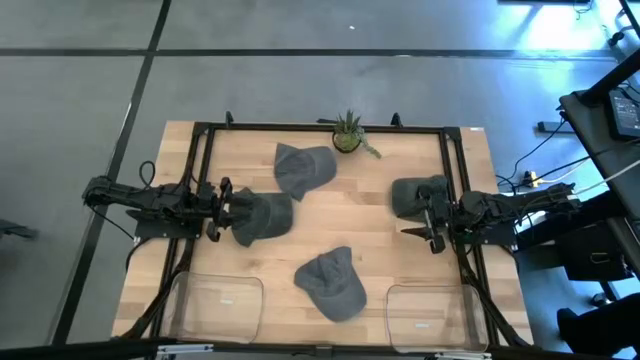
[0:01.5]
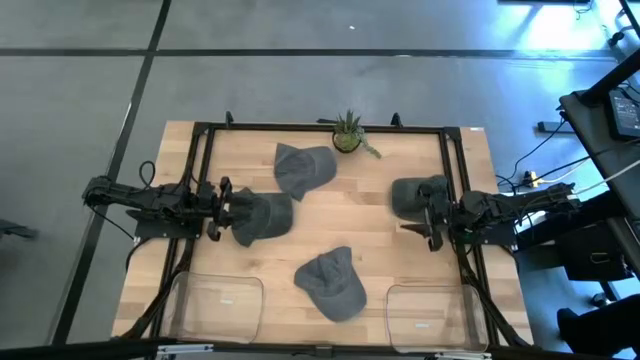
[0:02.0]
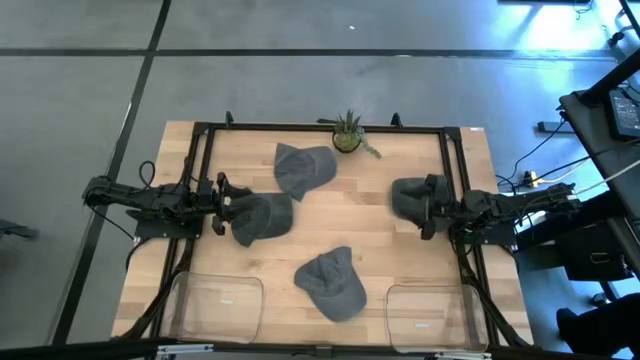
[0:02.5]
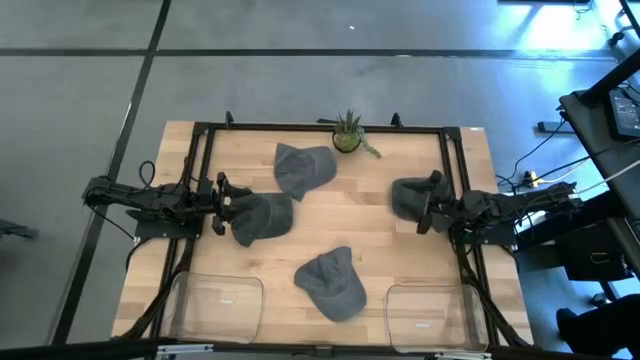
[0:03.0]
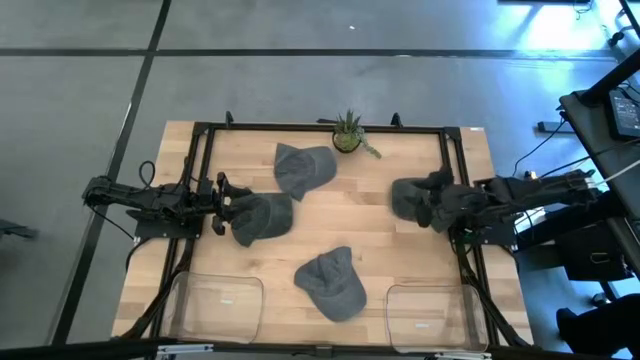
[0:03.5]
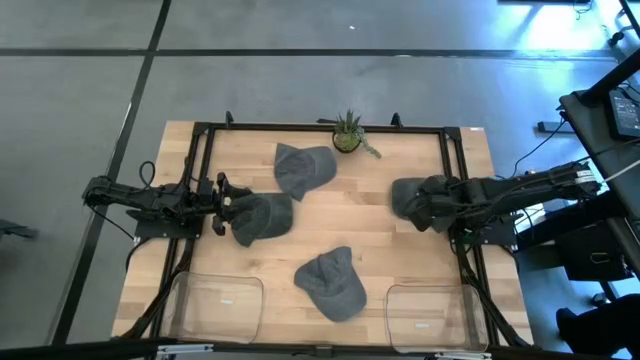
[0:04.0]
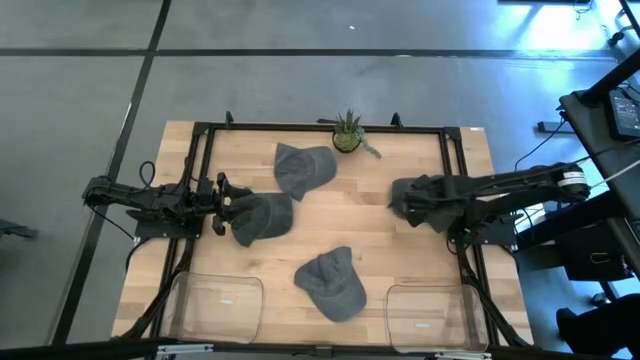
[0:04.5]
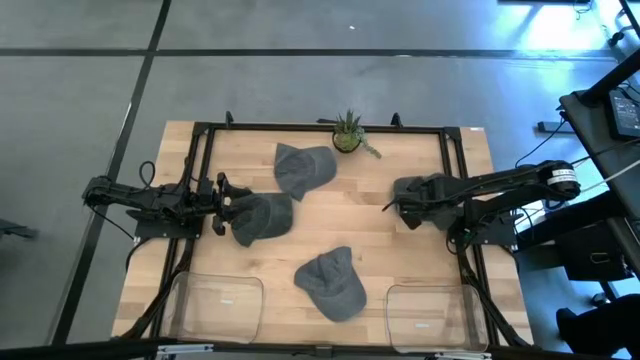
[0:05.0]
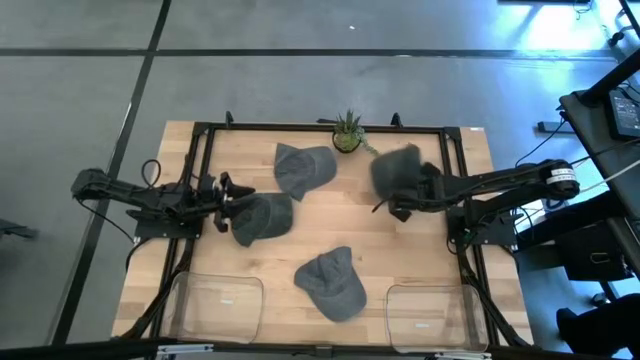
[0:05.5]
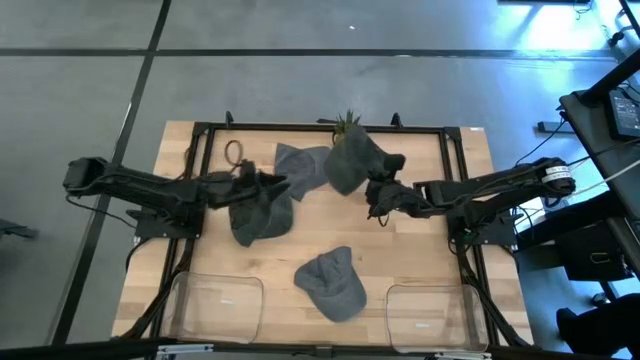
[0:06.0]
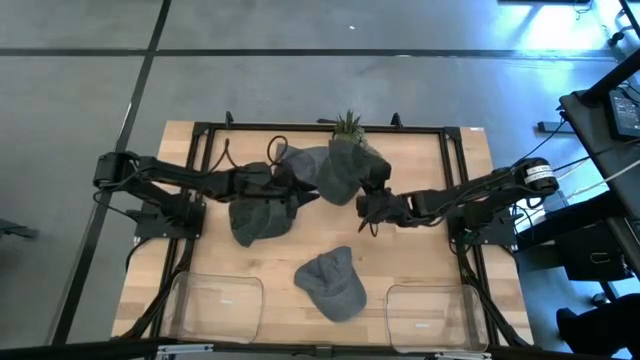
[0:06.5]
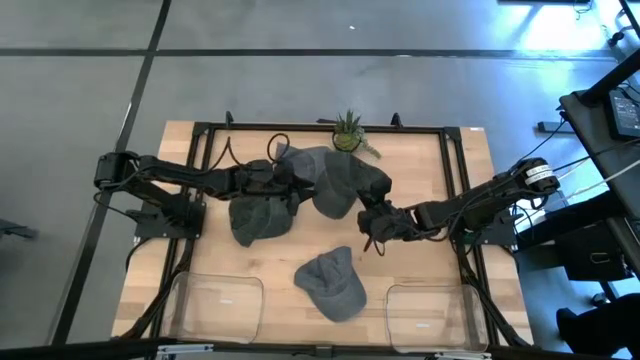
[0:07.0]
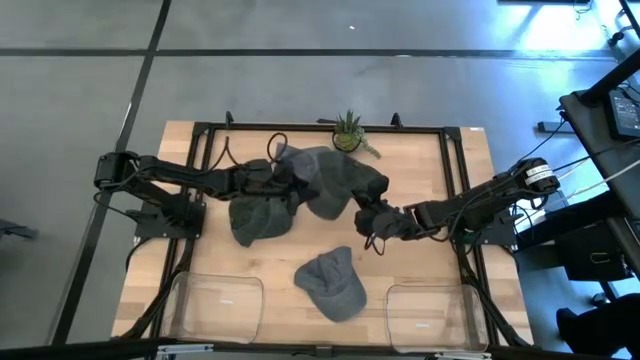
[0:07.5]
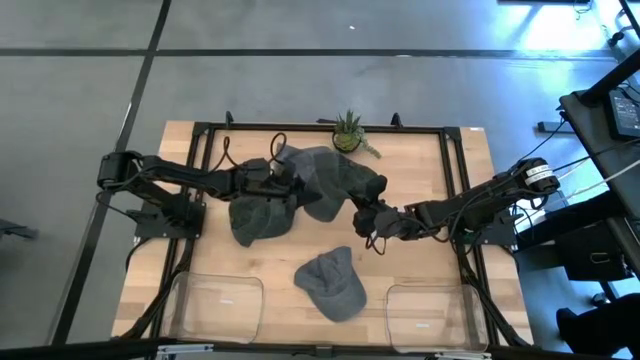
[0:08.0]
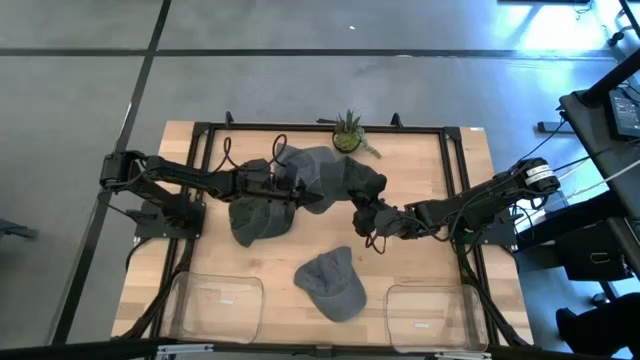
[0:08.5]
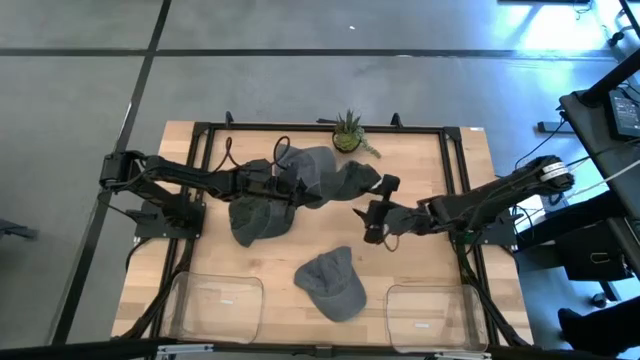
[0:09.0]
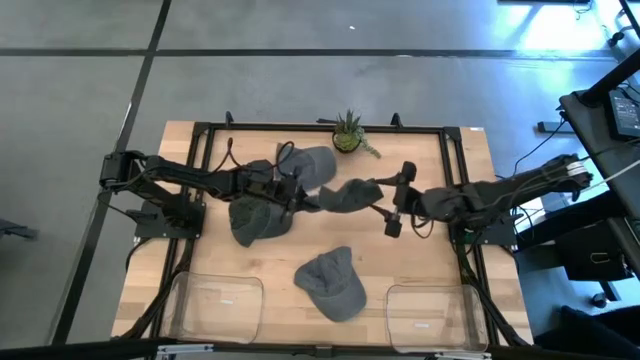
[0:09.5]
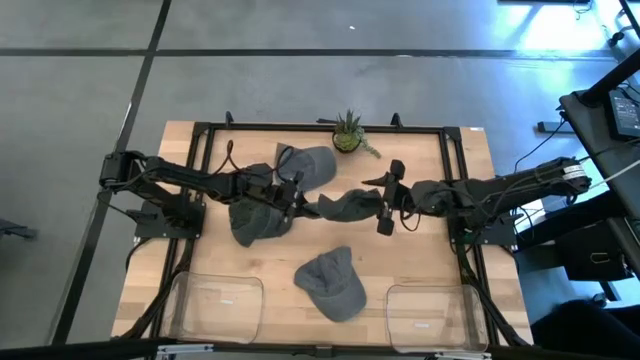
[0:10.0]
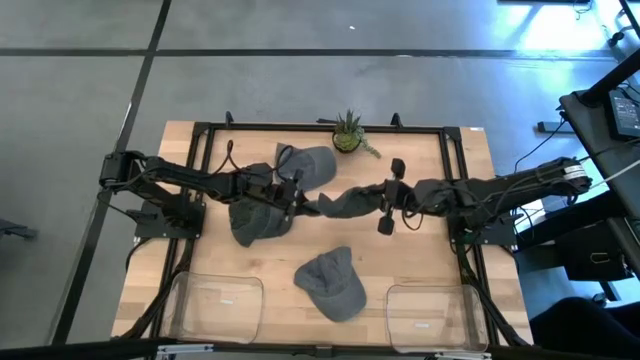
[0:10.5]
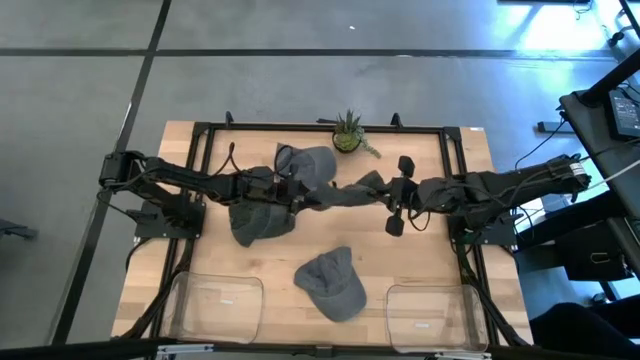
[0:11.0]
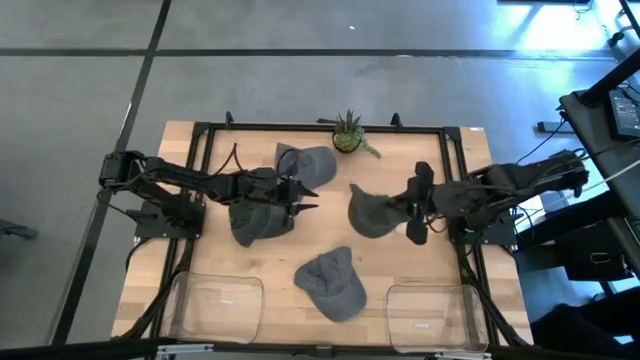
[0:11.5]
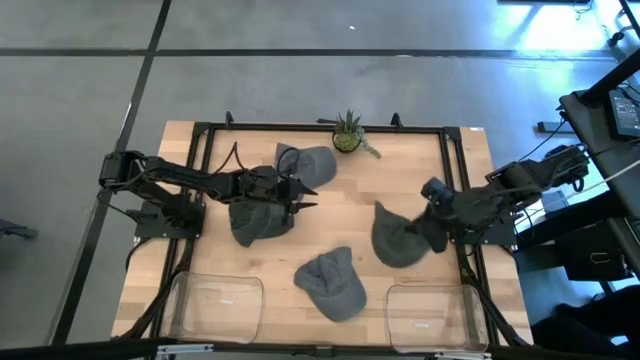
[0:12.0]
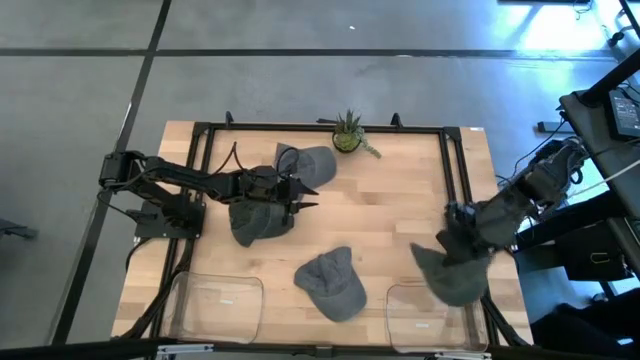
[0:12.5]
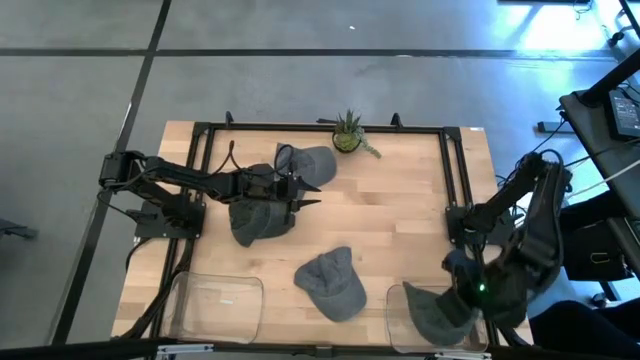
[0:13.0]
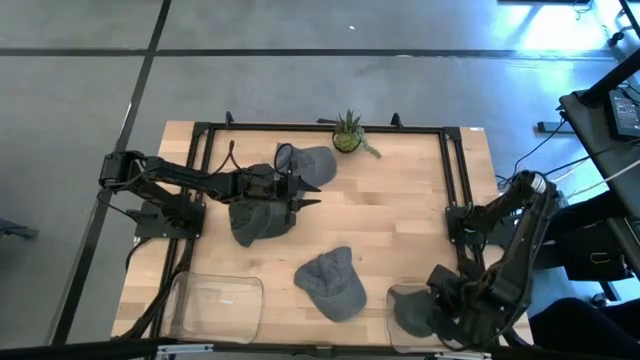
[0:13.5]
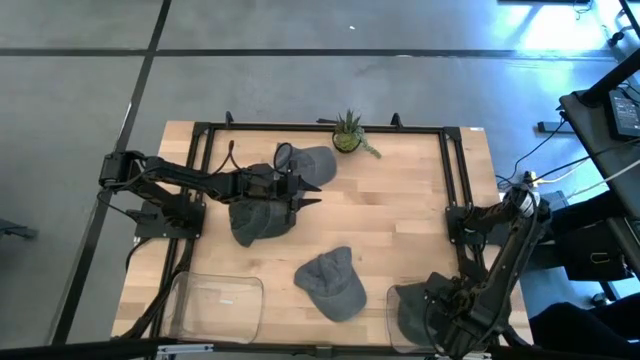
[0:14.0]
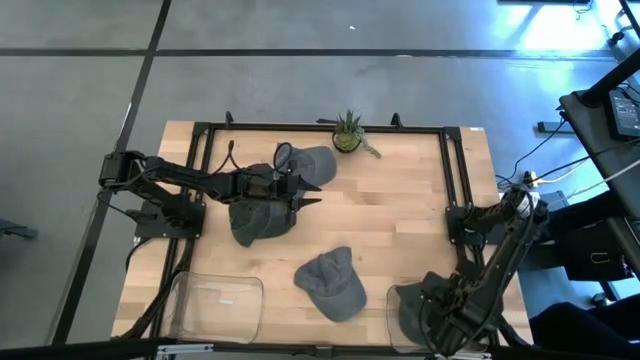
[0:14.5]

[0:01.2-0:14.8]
Task: Pick & Place hat
Put the right black cap into the right transparent bin

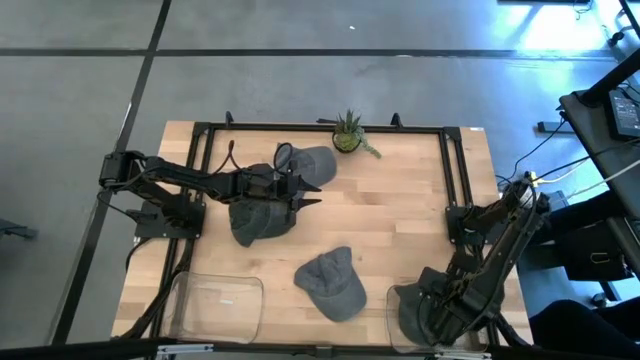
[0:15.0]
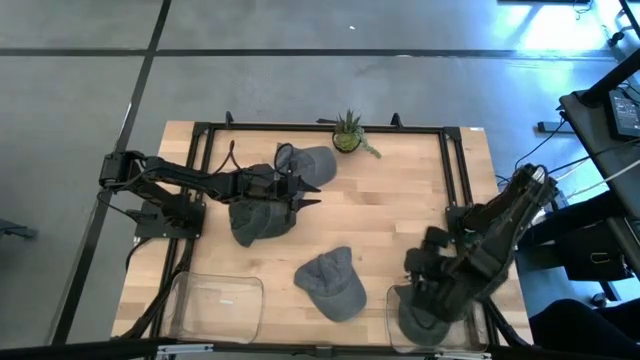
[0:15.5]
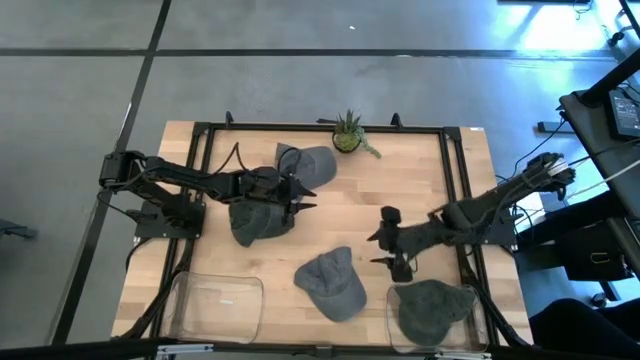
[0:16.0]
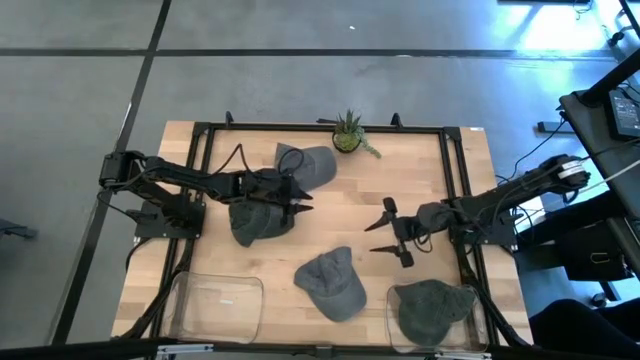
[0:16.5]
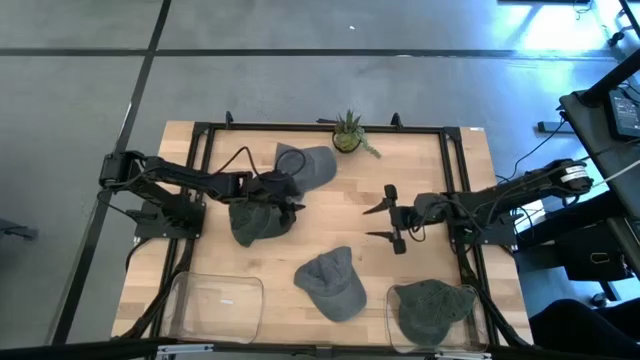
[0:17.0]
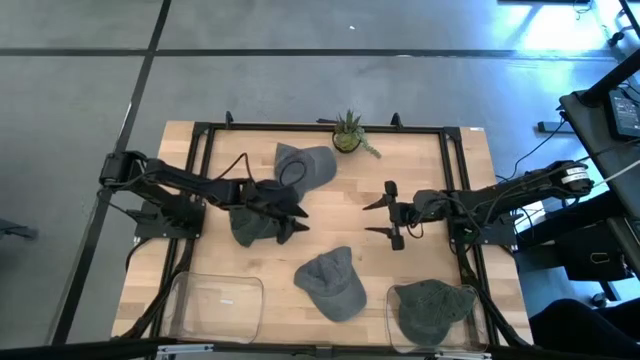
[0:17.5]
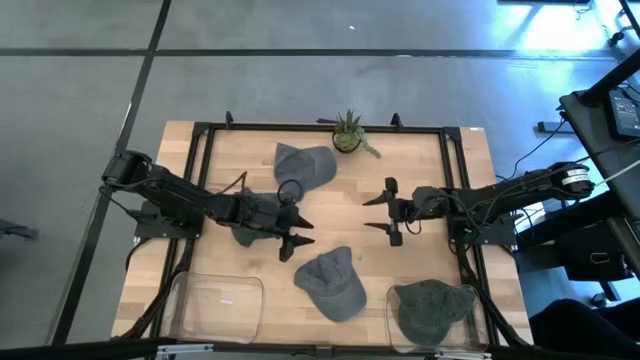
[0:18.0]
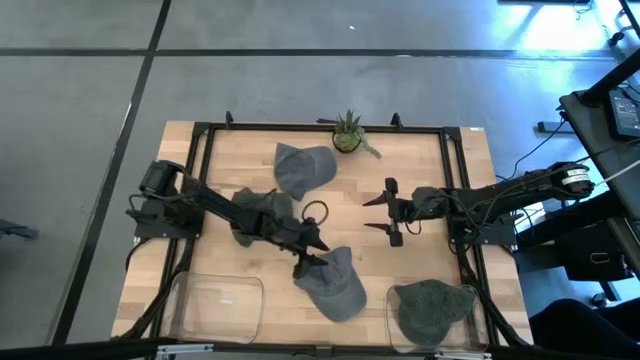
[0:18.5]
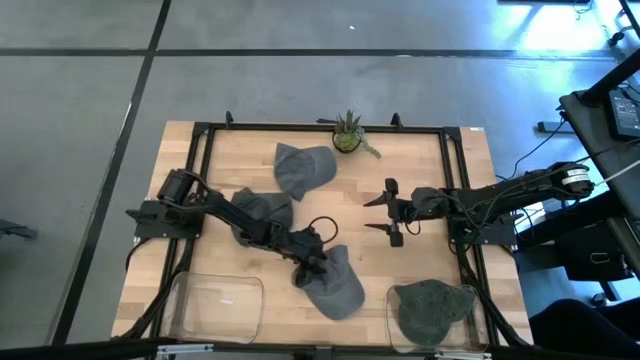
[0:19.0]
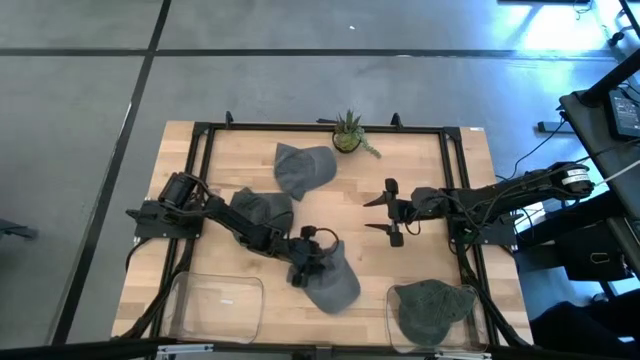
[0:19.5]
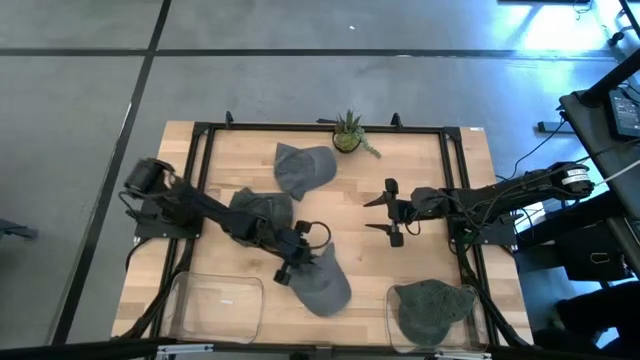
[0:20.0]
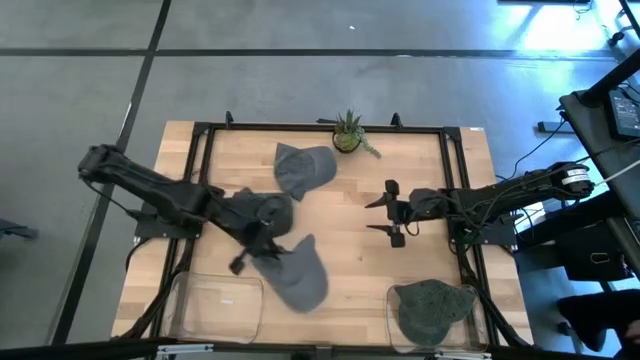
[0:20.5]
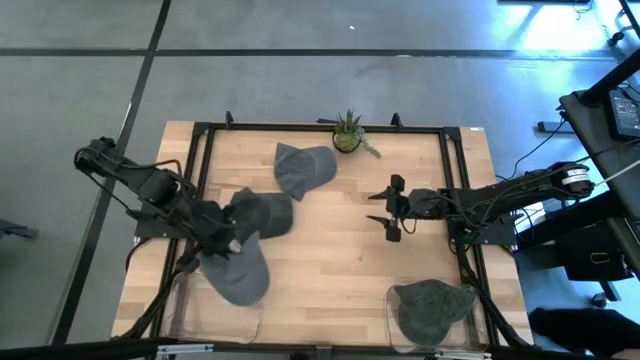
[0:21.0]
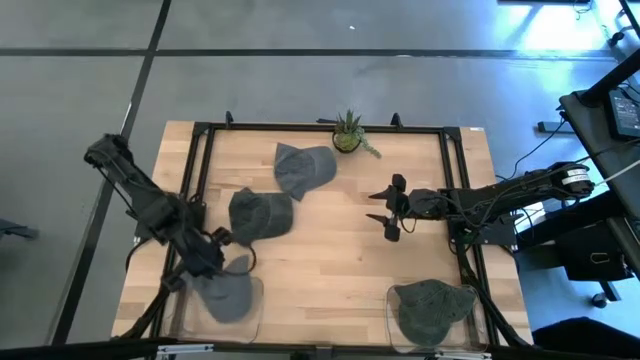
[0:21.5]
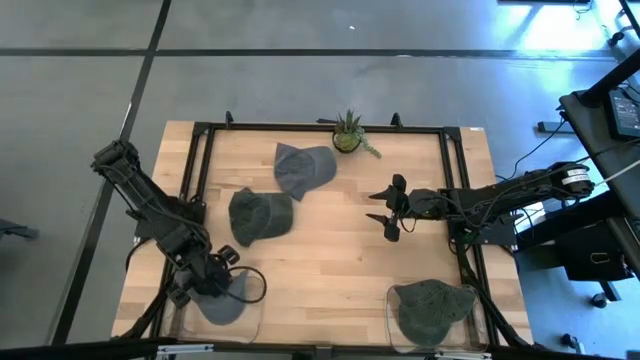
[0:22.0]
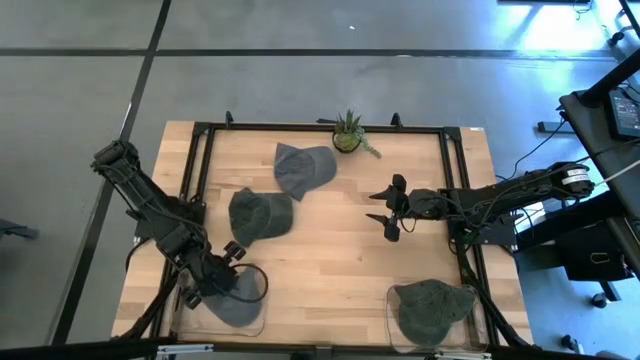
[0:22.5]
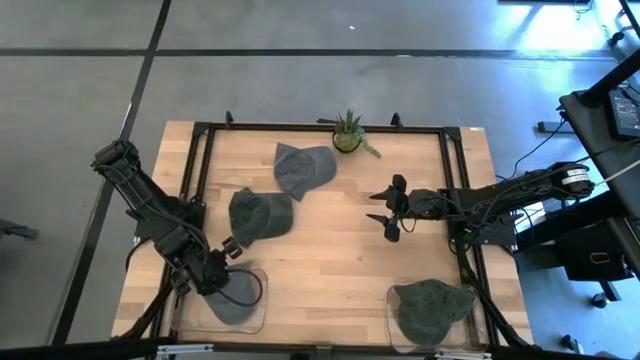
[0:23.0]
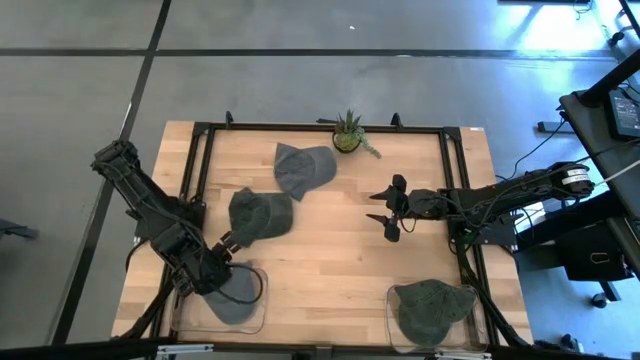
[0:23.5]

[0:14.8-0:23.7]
Put the bottom grey cap into the left transparent bin
